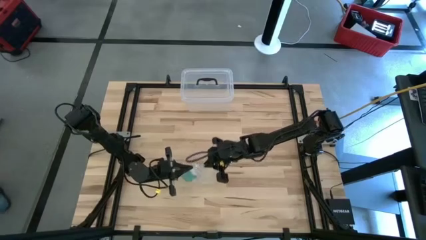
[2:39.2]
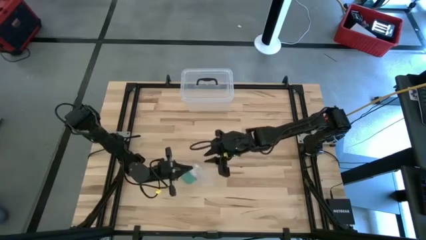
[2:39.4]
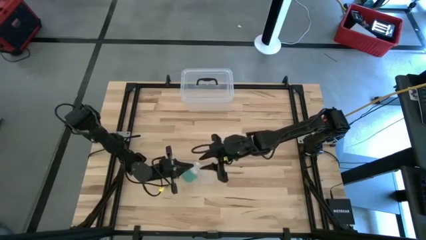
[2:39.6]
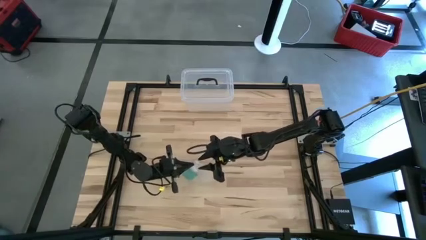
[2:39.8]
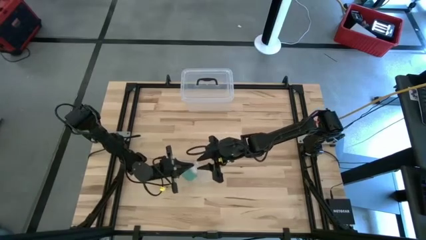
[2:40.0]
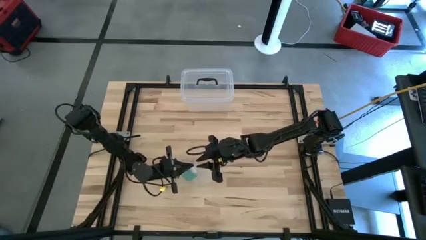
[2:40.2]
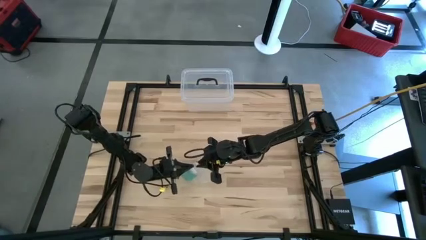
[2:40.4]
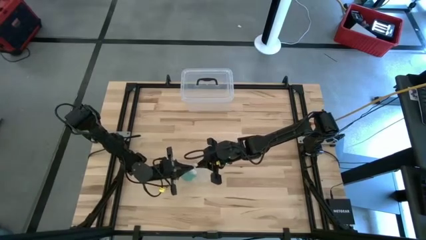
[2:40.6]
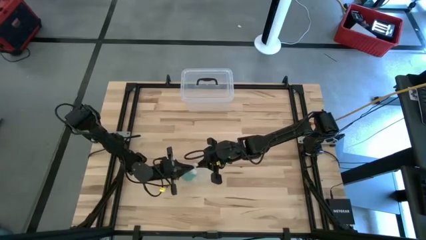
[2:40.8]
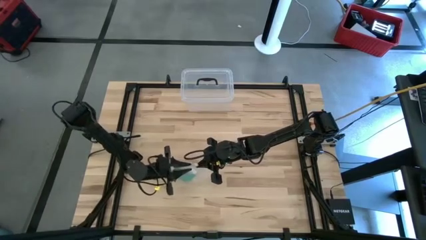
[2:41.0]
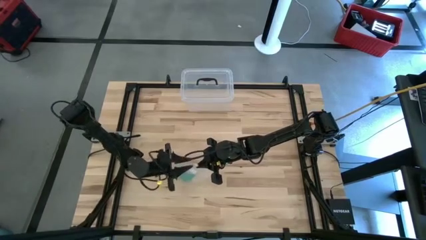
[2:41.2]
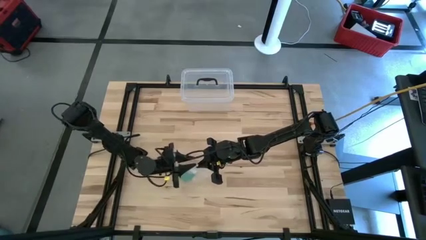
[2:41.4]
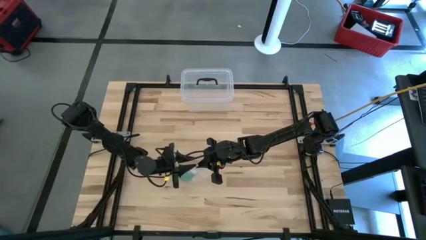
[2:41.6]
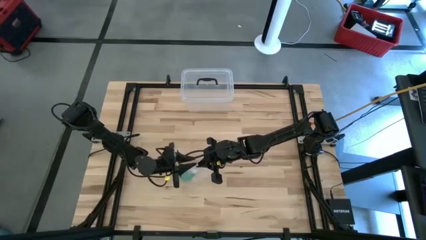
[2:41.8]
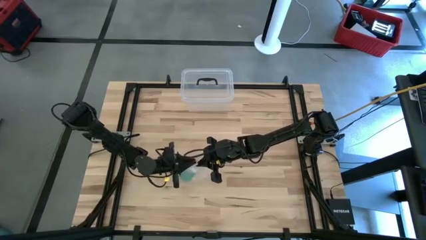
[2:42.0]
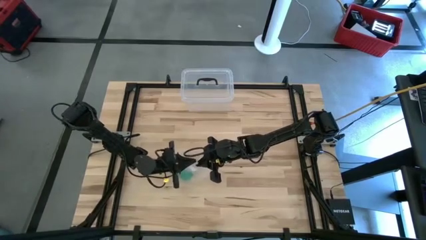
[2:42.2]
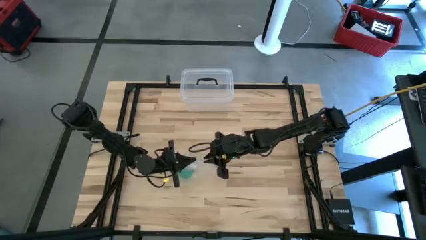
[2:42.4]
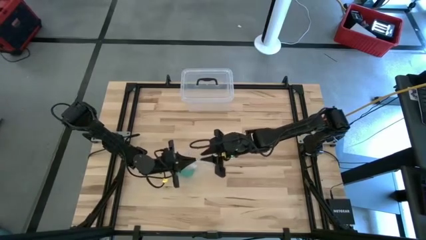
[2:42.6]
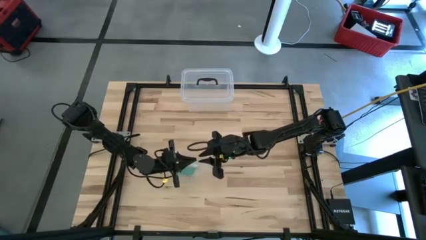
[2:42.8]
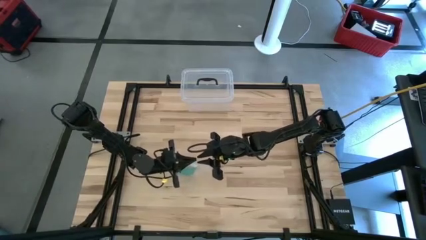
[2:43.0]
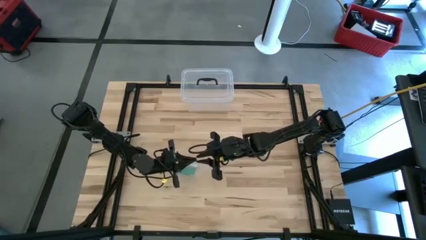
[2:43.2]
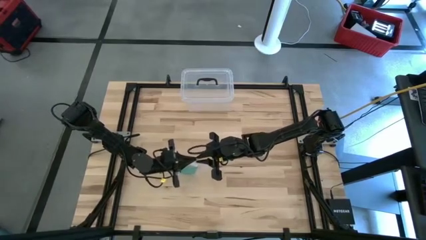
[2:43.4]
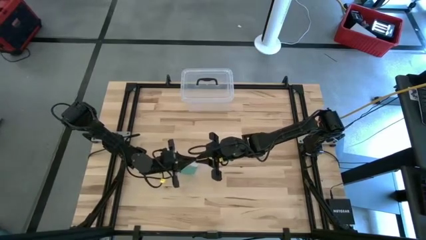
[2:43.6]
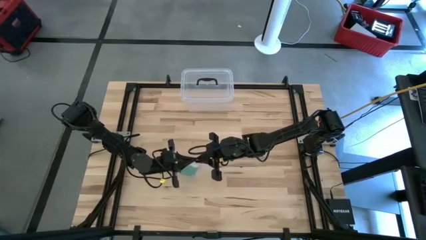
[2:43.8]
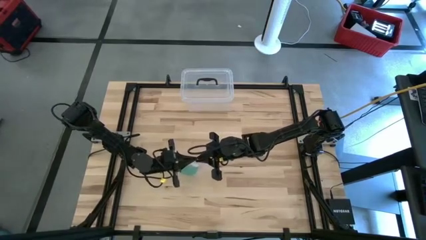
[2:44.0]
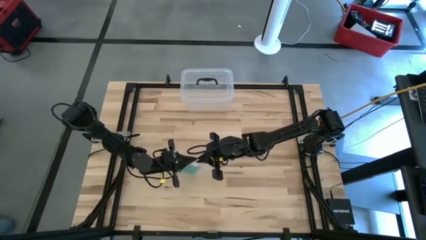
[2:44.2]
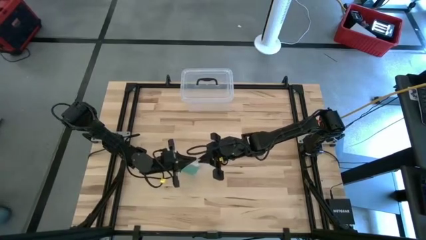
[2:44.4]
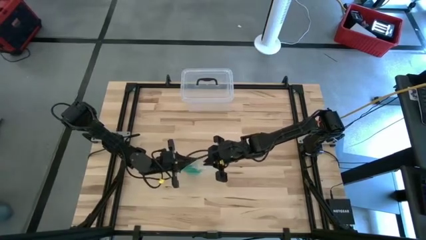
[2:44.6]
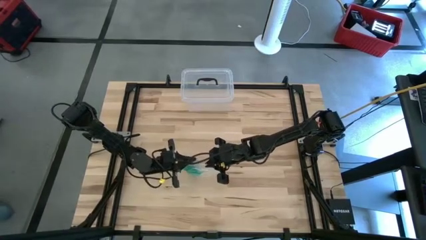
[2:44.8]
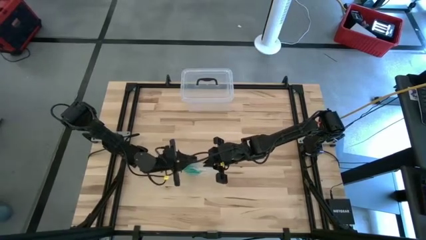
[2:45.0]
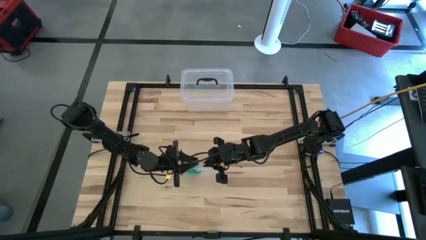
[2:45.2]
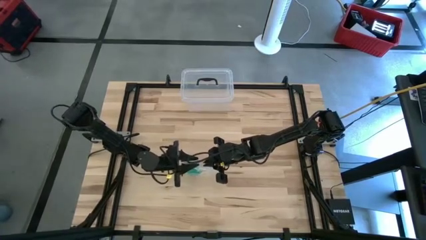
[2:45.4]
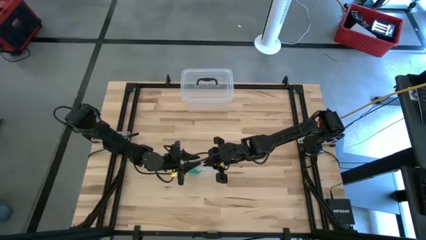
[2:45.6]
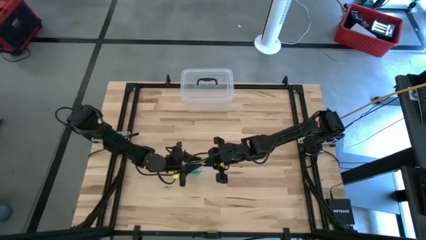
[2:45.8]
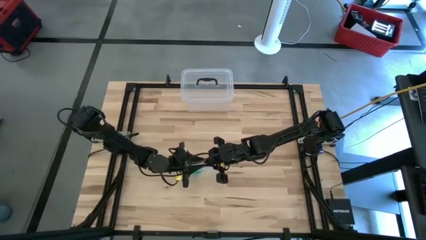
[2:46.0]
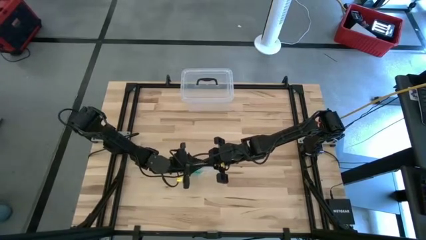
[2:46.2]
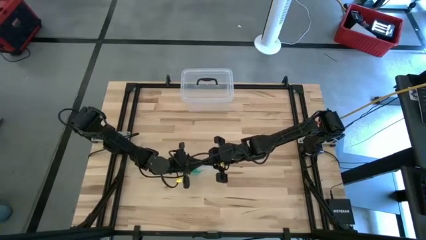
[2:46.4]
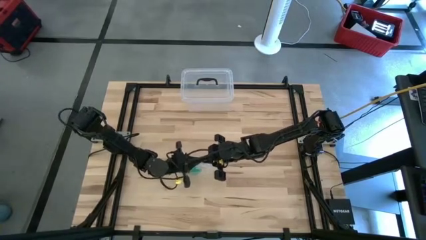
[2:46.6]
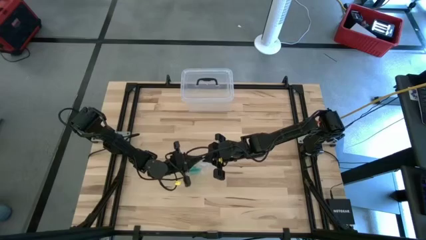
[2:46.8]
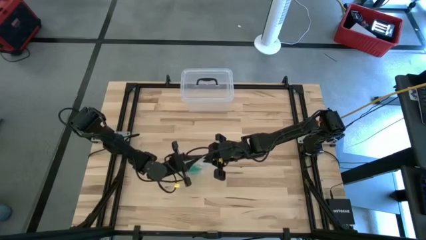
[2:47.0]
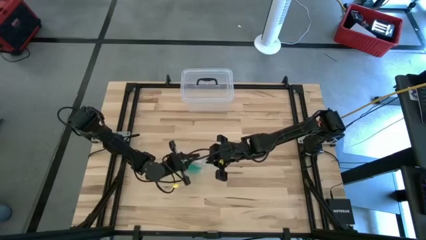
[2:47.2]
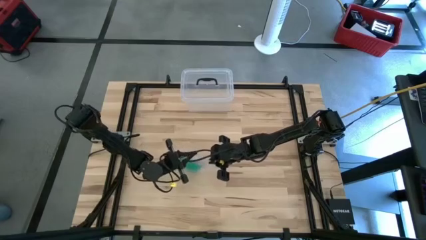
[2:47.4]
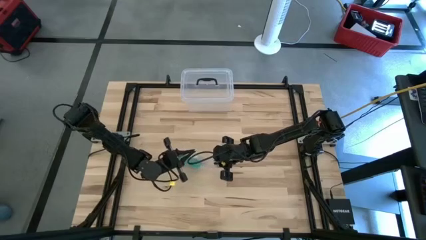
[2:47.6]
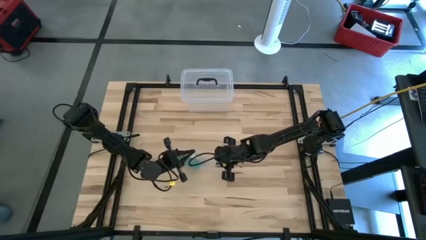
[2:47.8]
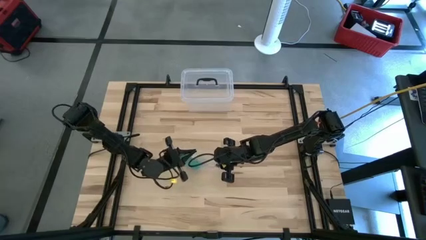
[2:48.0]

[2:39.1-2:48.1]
Task: Roll bandage
Close the transparent zip bag

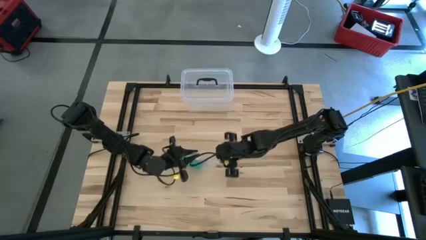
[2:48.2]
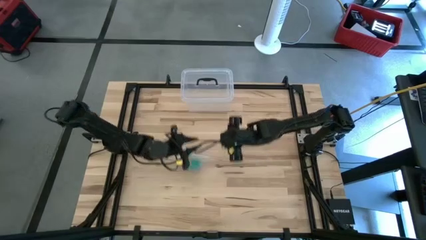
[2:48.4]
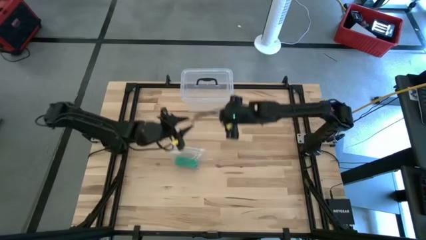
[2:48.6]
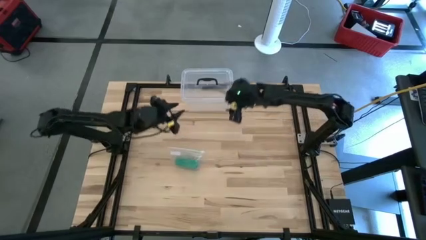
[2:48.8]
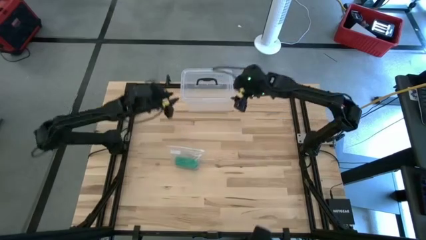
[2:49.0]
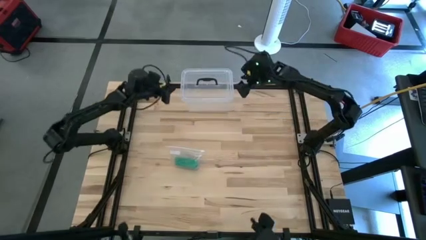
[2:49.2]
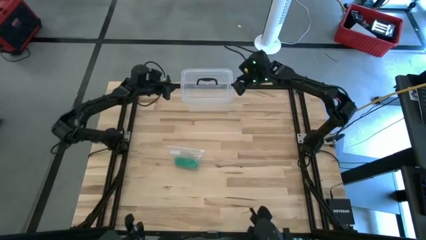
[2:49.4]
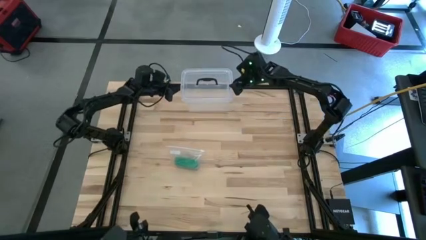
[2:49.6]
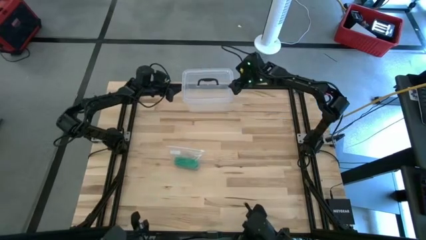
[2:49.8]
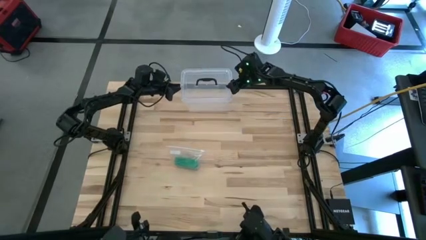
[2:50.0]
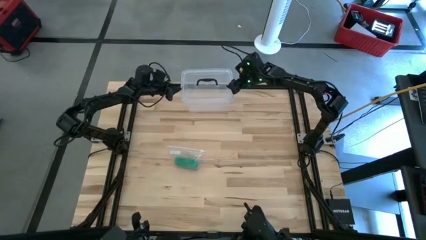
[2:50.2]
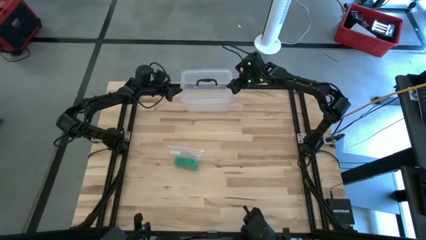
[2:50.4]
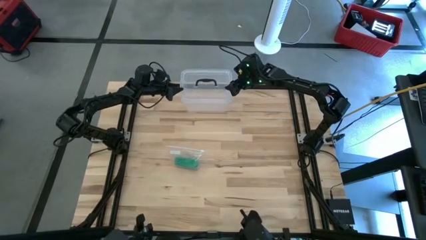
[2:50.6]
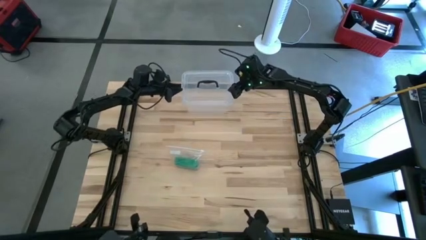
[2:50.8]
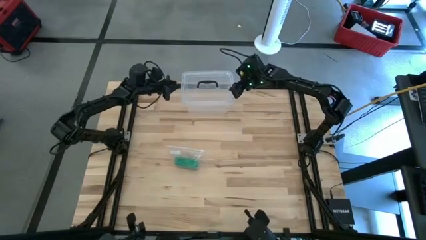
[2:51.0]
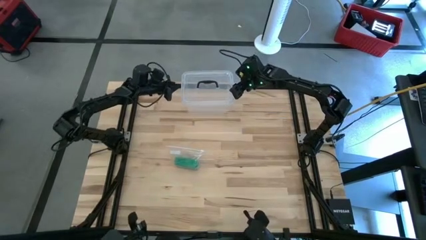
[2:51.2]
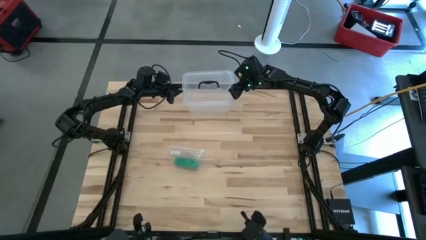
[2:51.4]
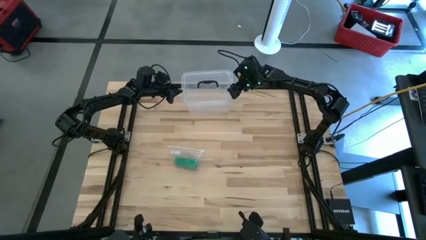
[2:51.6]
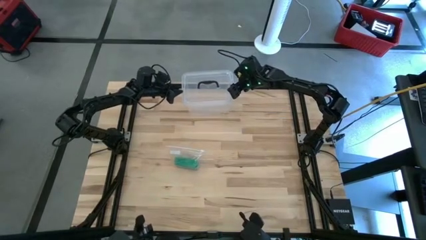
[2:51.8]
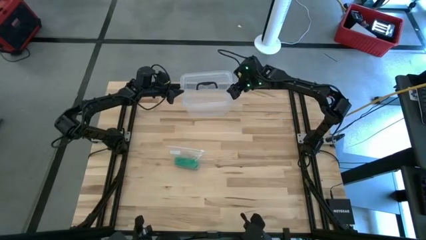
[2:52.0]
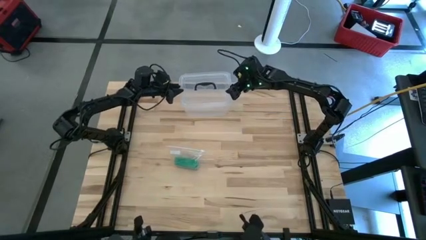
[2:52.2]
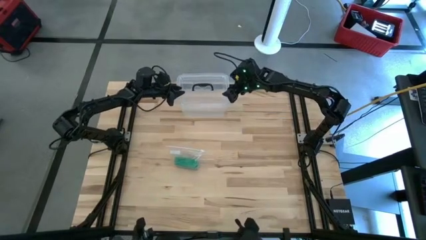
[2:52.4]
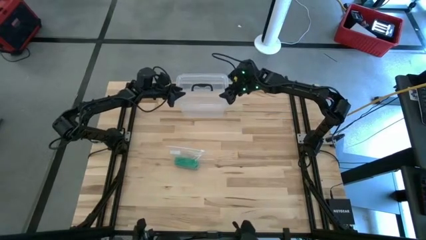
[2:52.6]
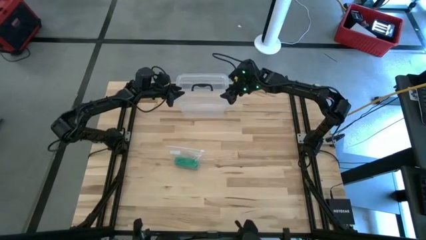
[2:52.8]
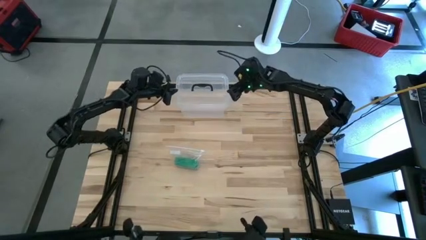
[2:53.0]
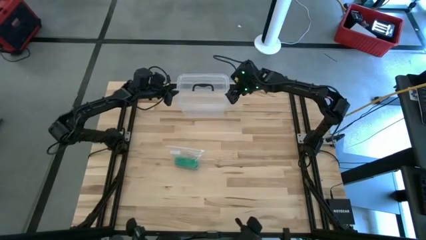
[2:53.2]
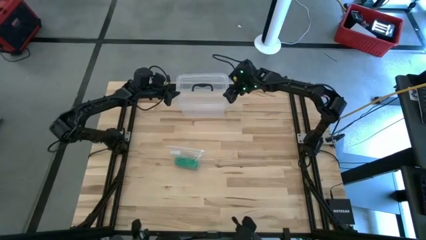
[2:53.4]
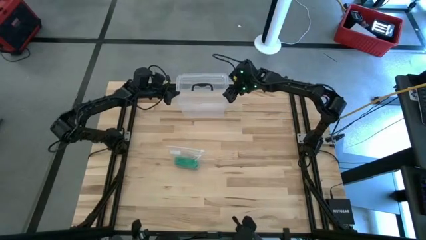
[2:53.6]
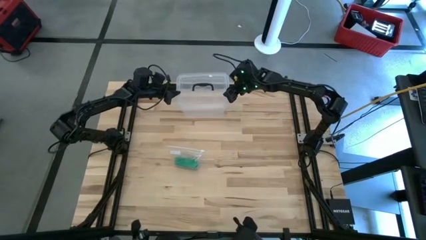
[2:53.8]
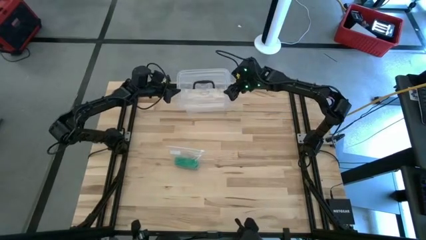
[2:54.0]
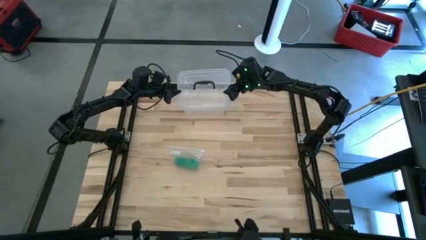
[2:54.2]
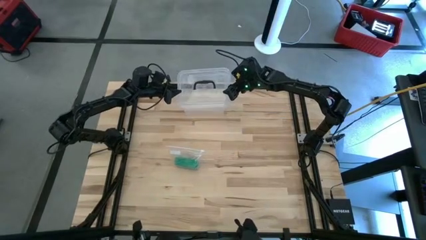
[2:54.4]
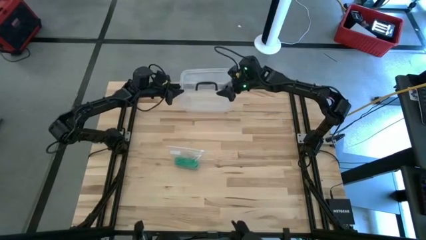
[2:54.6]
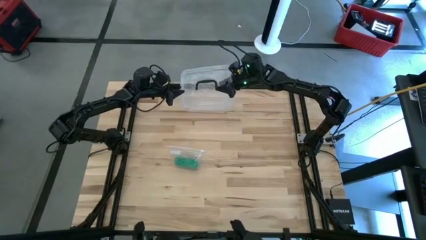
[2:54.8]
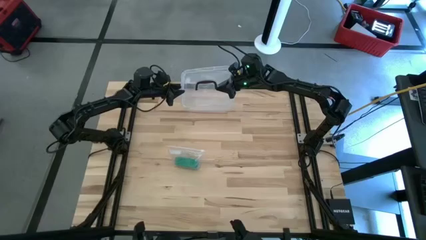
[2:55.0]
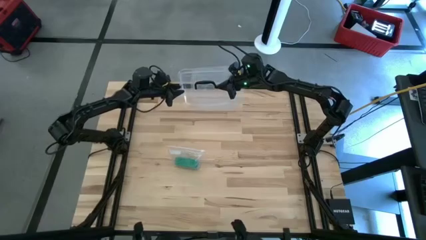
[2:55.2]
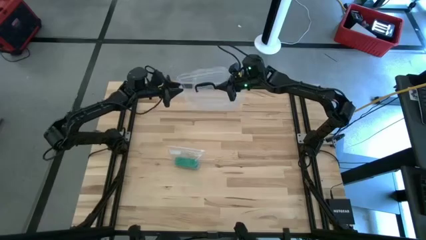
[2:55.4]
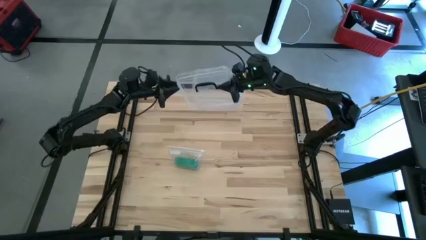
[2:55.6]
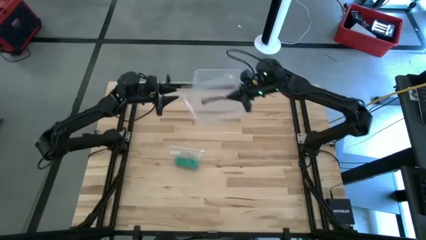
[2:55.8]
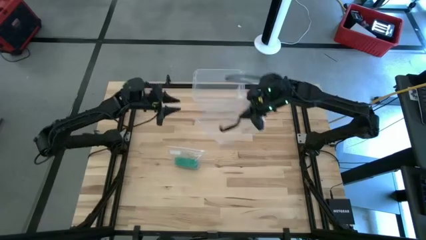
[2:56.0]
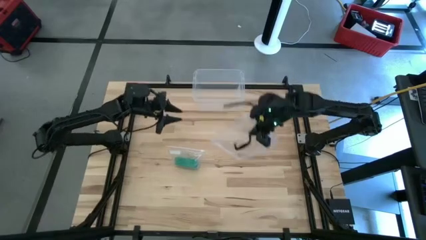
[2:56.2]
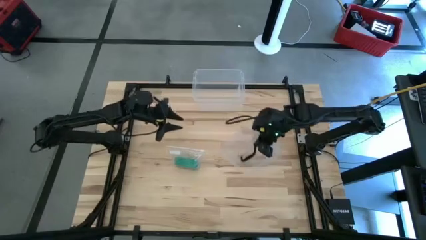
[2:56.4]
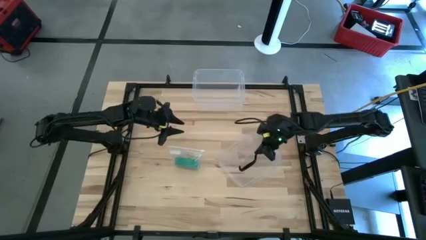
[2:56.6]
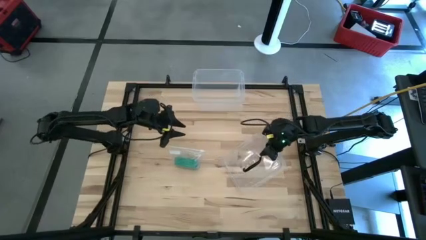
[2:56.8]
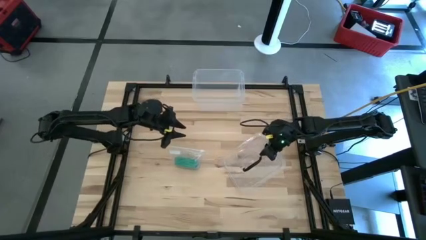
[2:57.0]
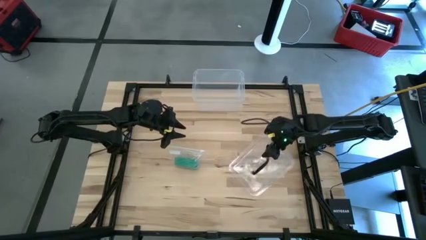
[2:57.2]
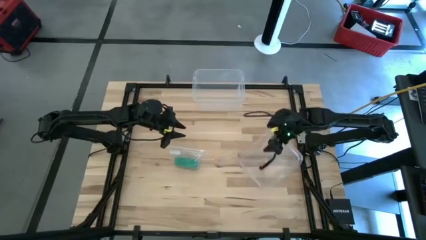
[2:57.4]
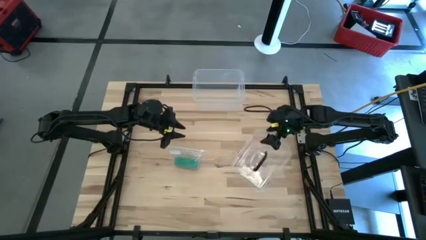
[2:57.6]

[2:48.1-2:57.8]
Open the transparent bin
